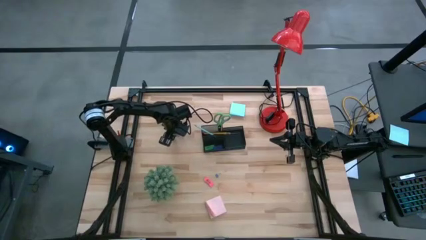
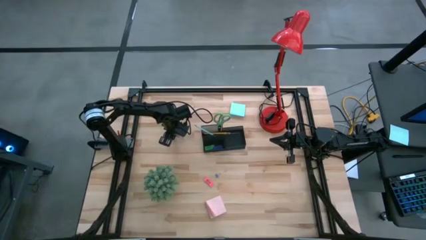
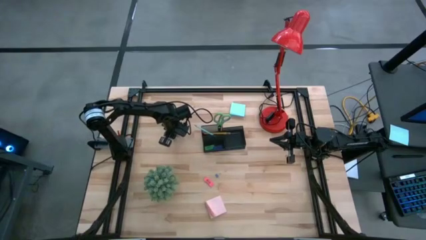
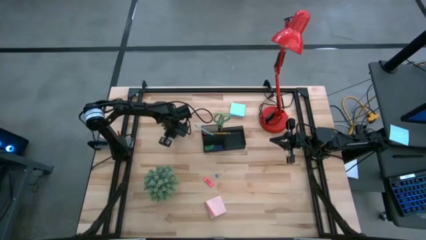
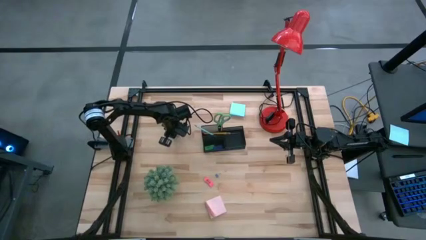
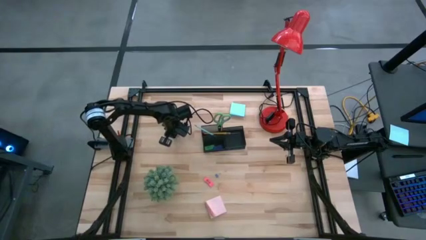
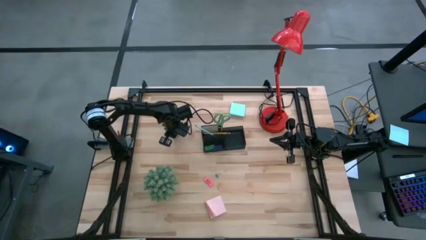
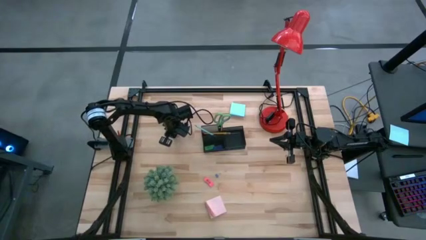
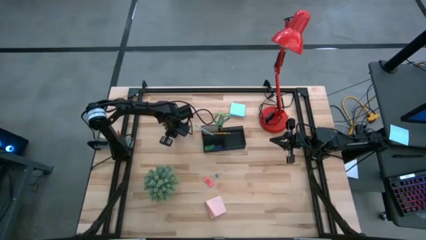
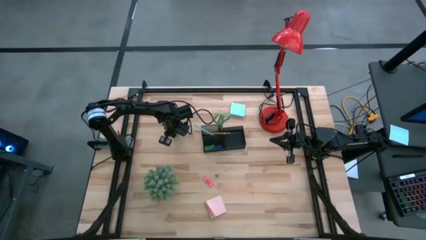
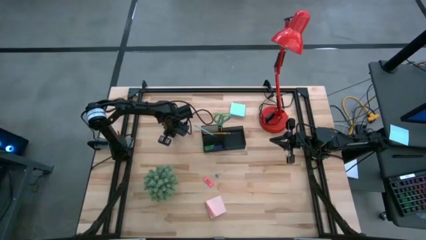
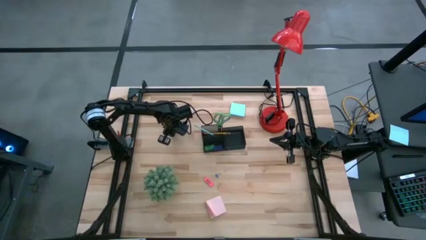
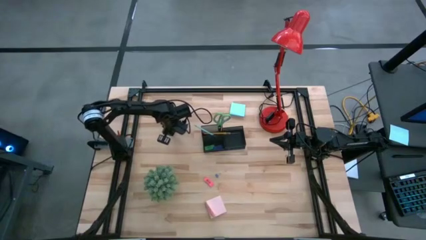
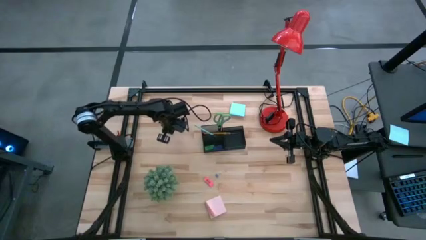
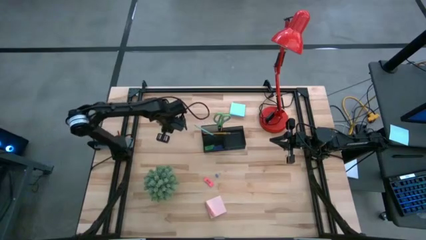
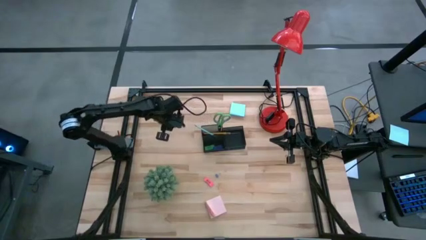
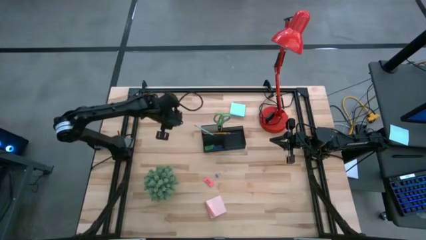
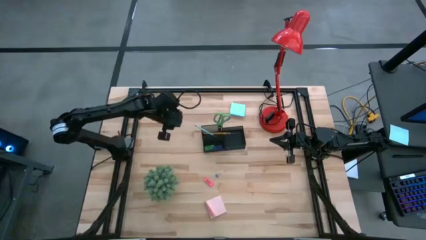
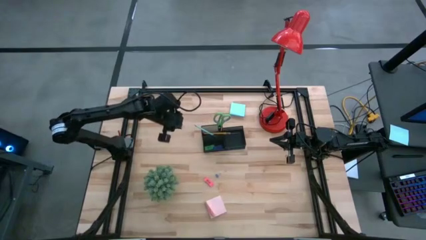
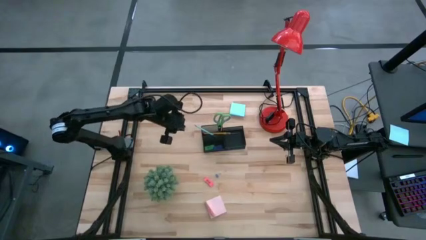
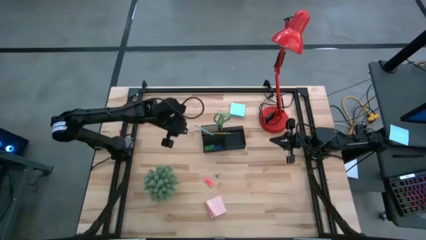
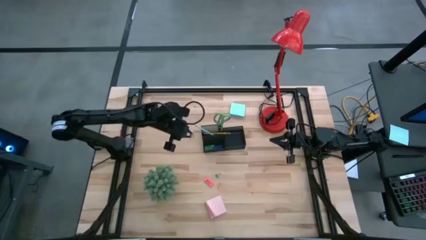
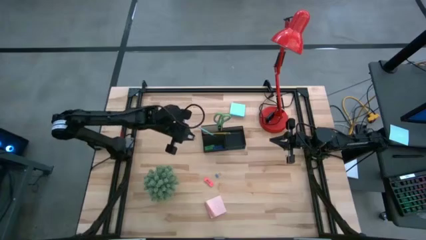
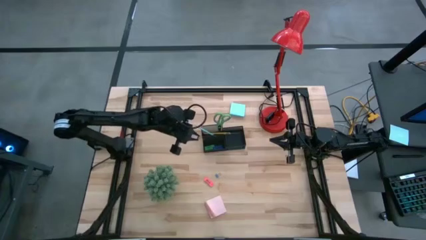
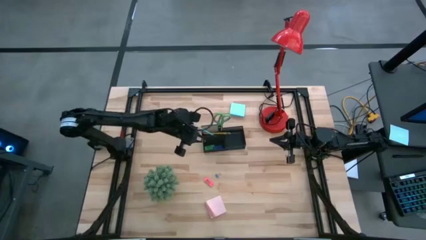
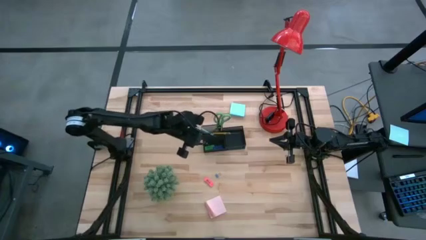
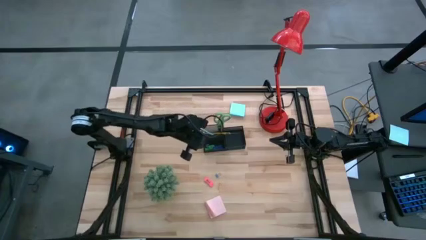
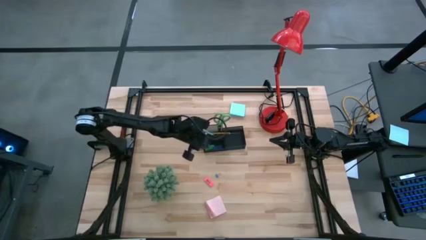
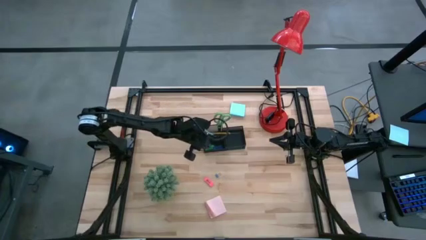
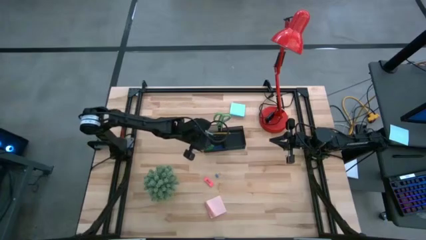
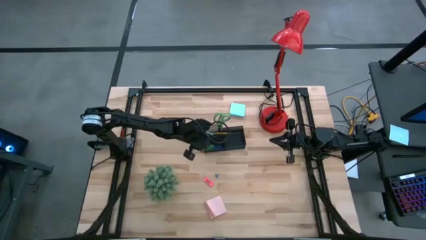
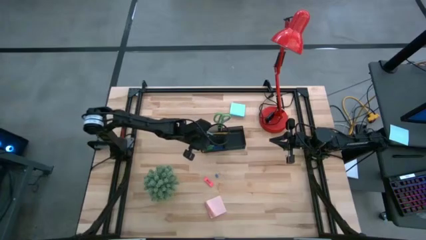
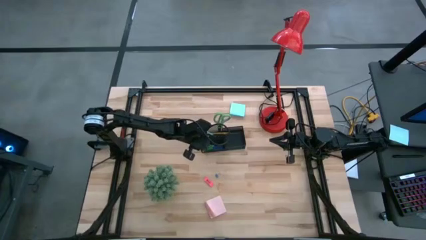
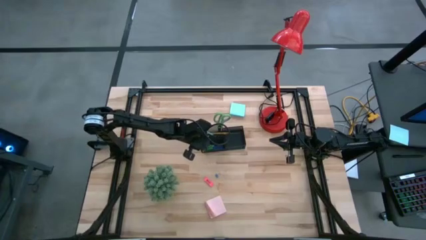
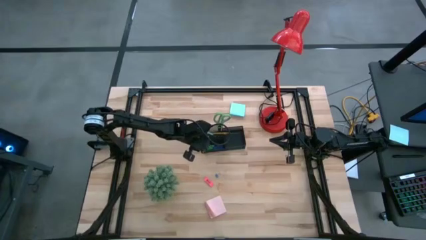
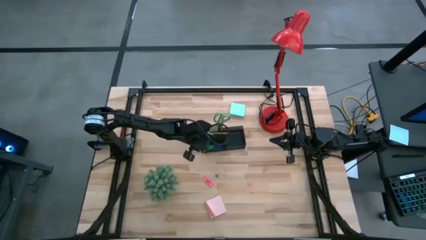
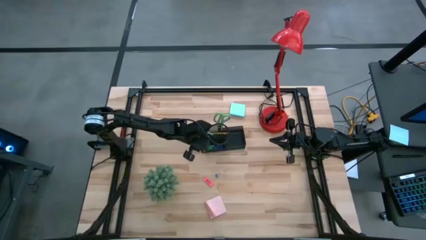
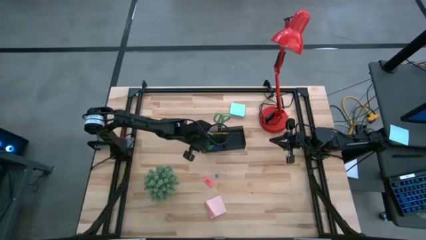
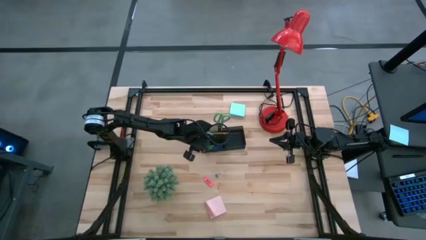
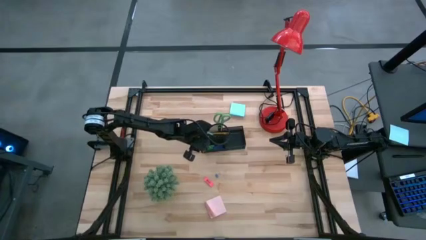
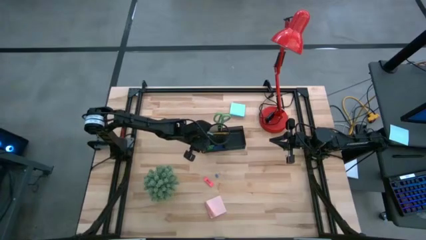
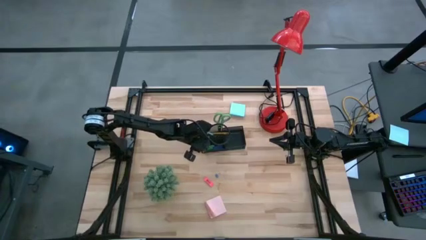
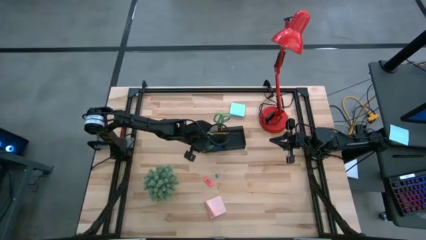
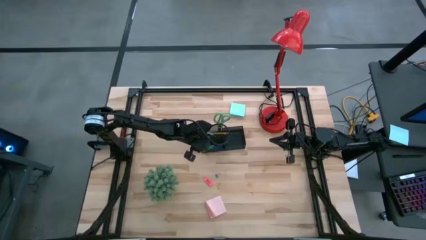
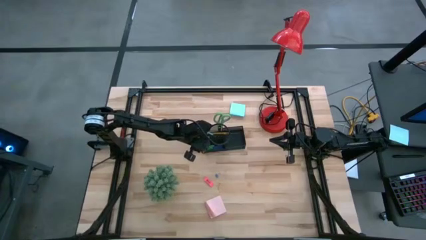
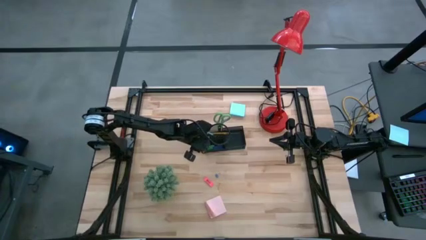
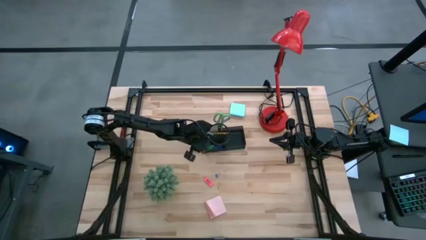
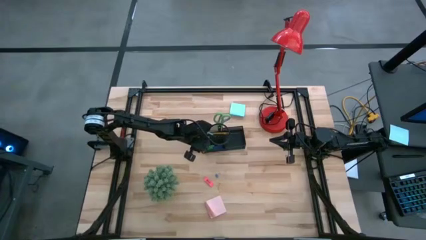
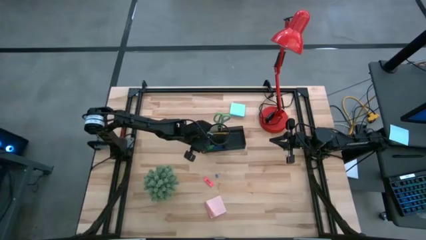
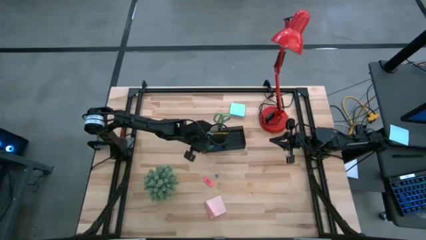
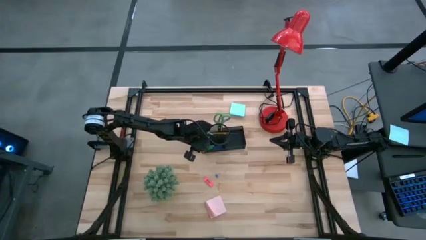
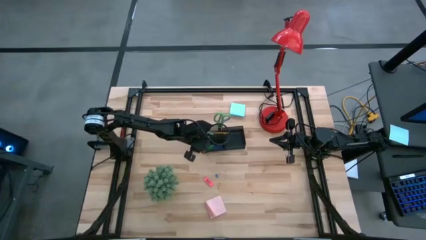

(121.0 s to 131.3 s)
Task: Pick and place office supplies into organizer
Put the top blue binder clip into the black desk organizer

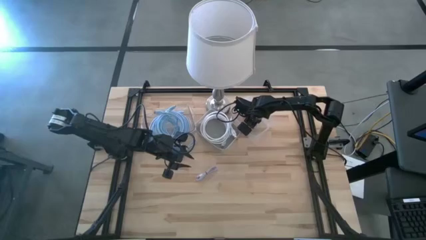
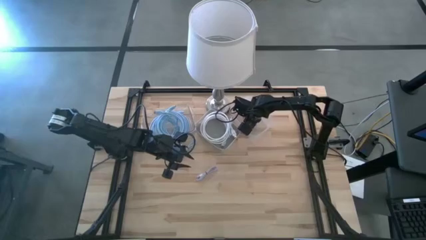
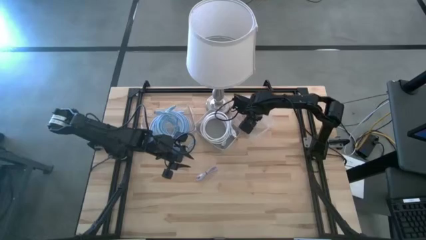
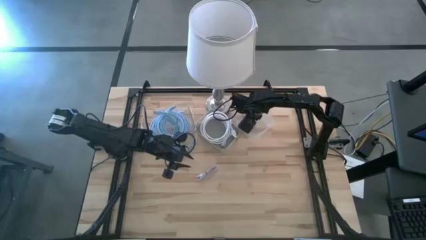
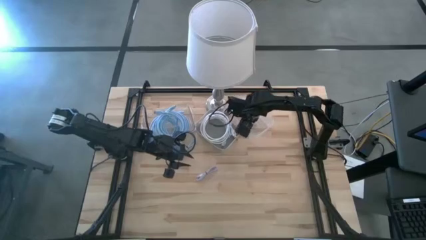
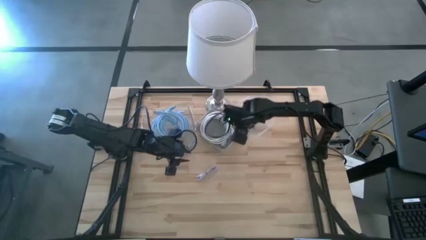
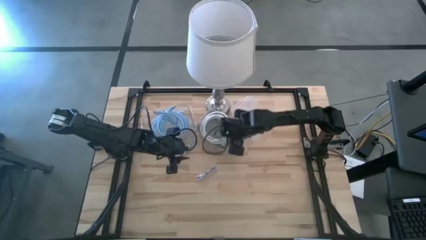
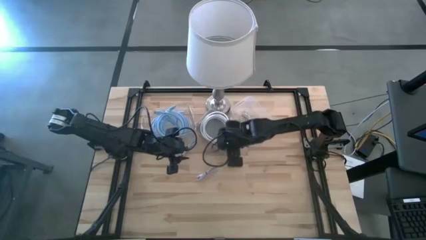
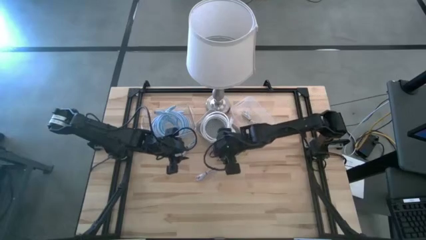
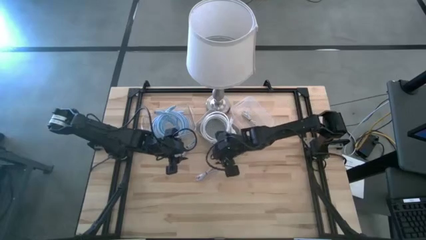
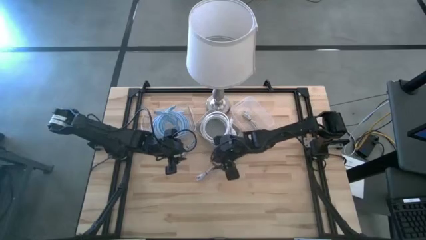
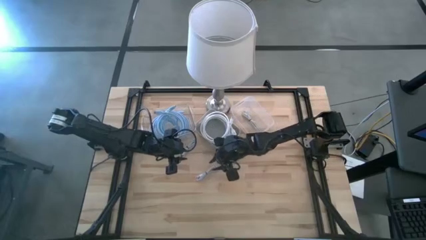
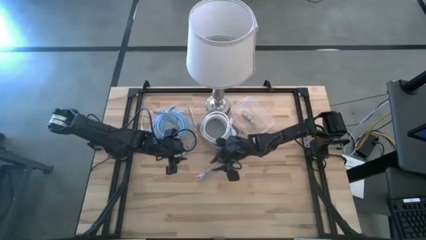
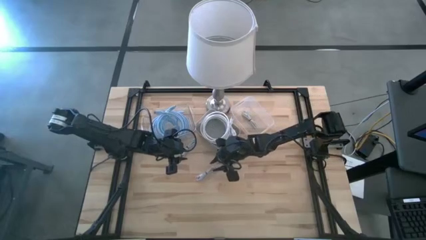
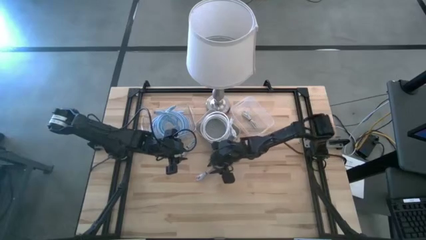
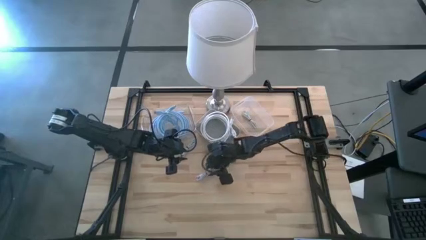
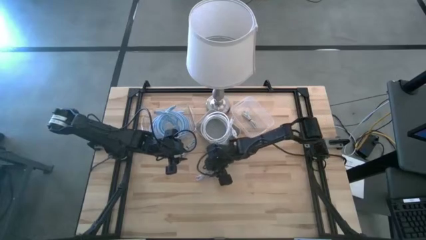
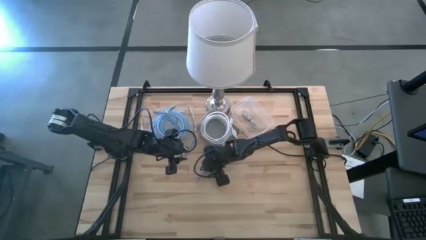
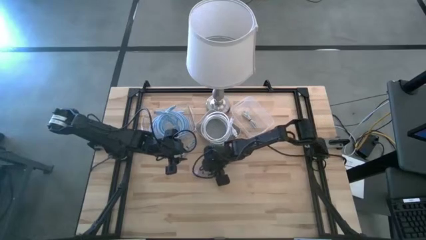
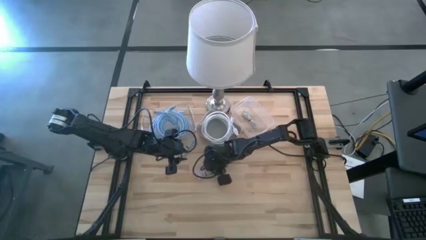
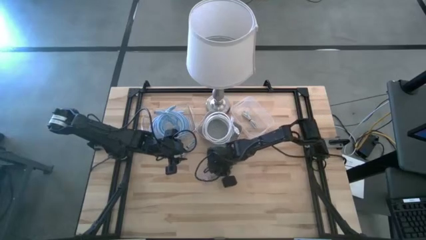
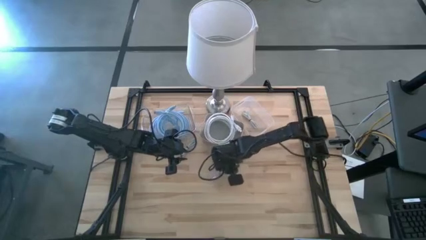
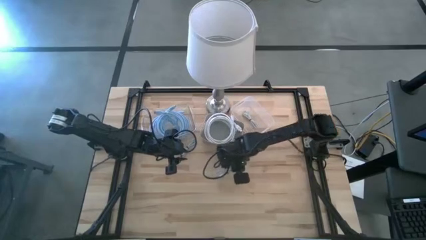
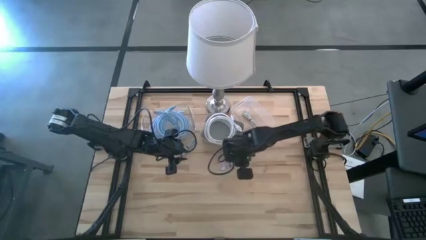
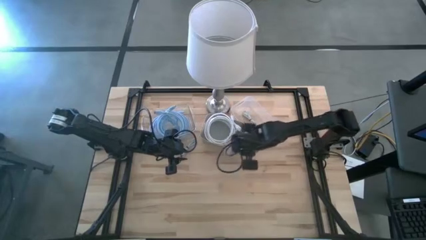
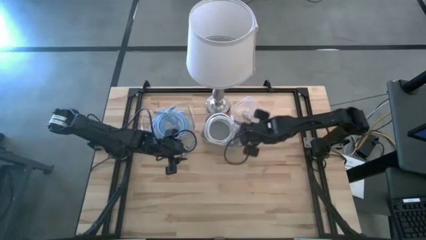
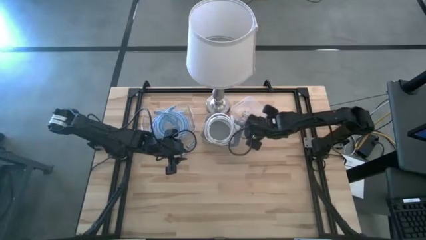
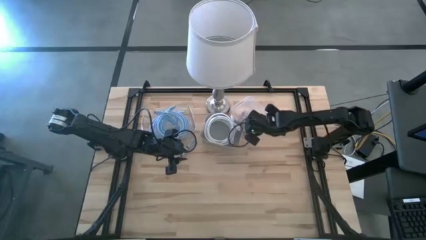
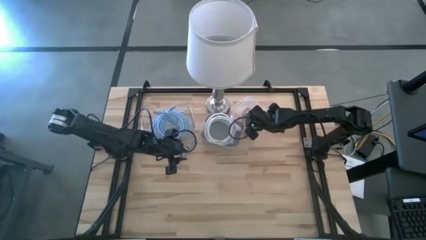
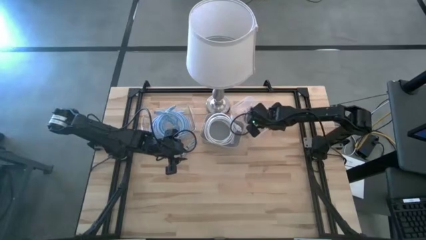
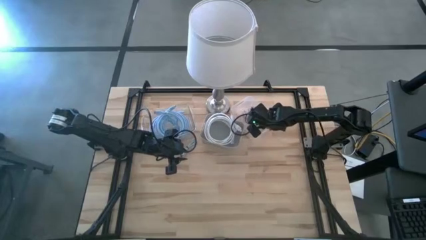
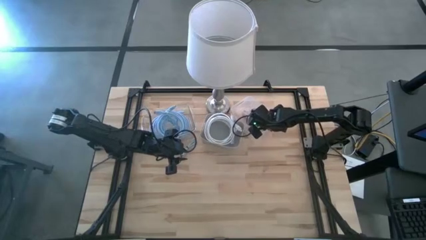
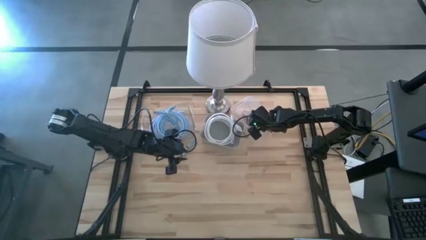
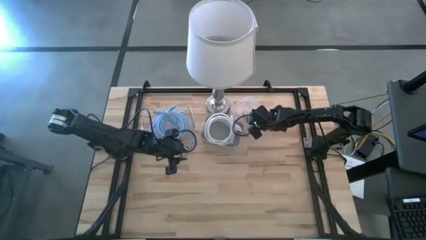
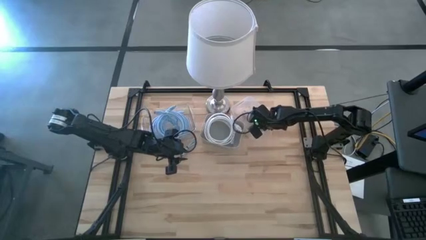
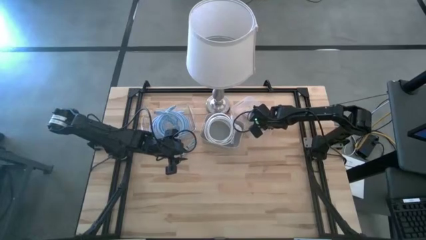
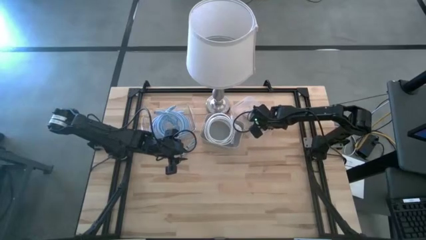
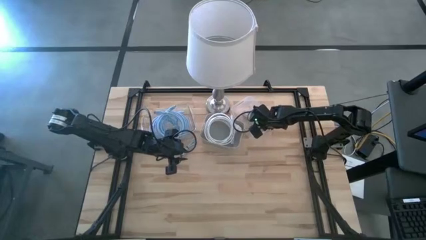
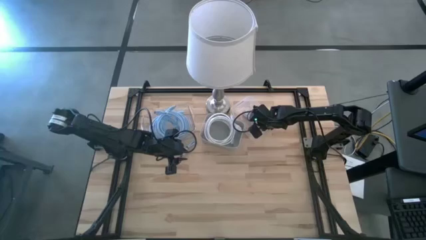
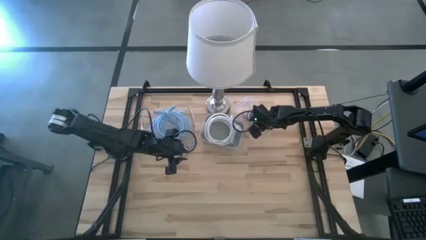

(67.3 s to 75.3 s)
Task: Pick & Place USB Port
Put the purple USB cable into the right transparent bin
